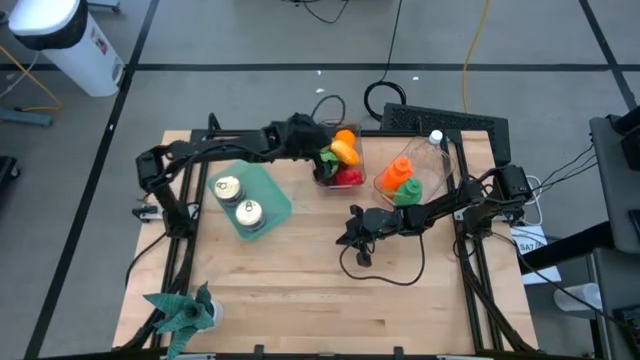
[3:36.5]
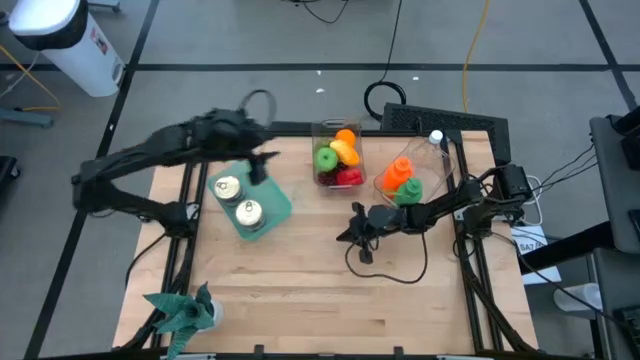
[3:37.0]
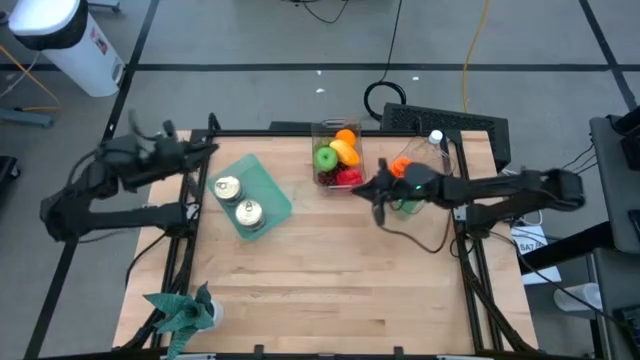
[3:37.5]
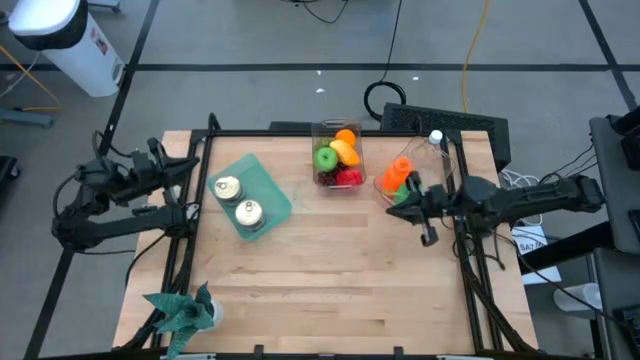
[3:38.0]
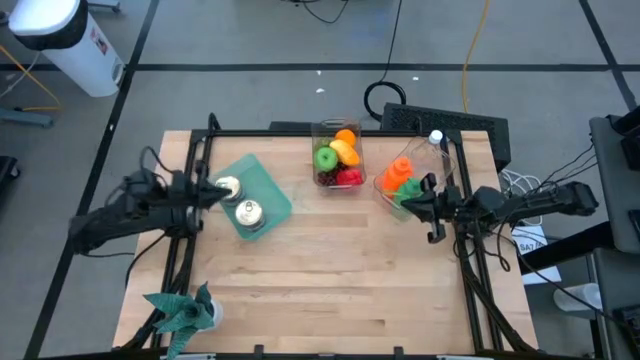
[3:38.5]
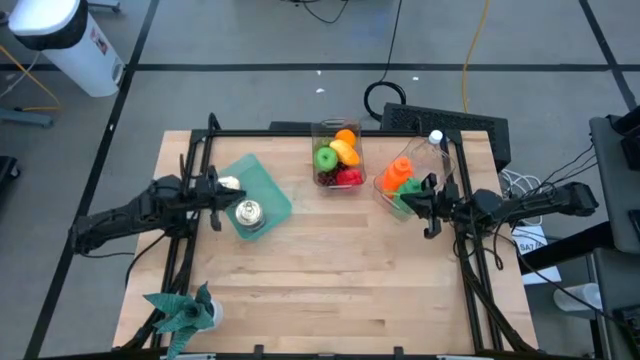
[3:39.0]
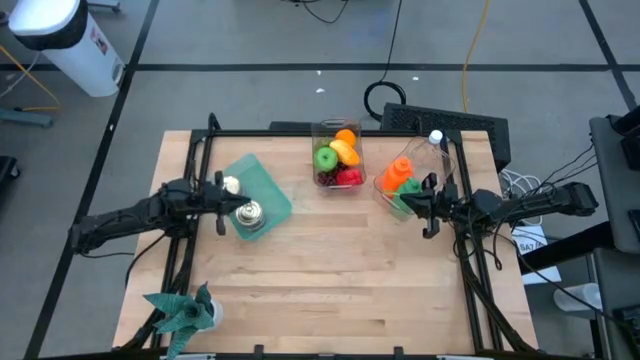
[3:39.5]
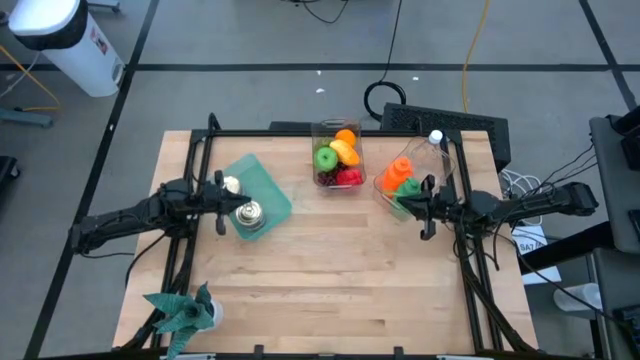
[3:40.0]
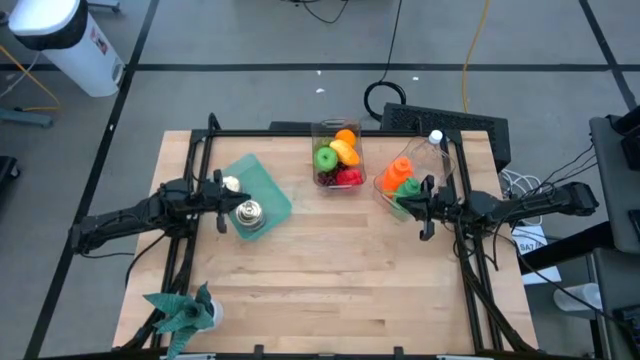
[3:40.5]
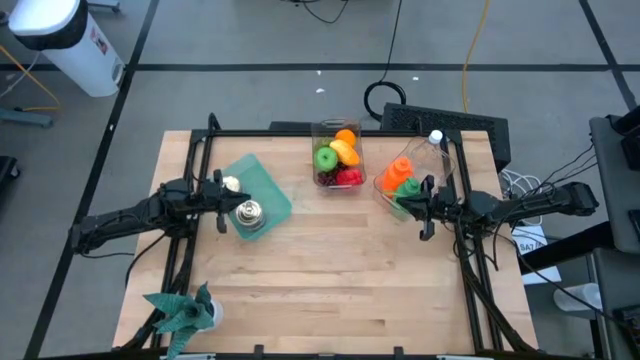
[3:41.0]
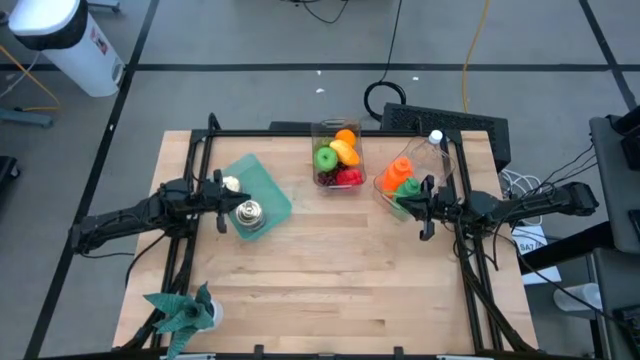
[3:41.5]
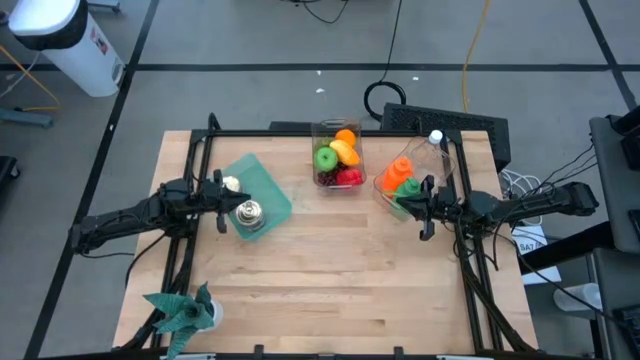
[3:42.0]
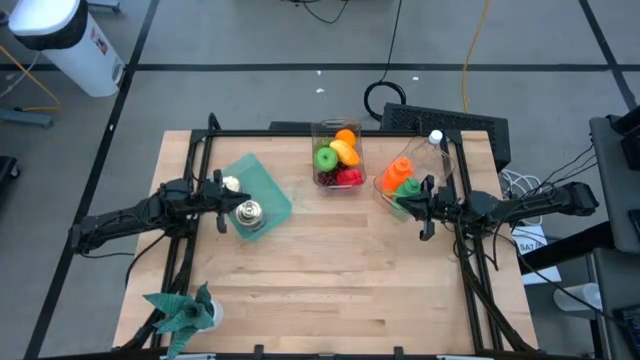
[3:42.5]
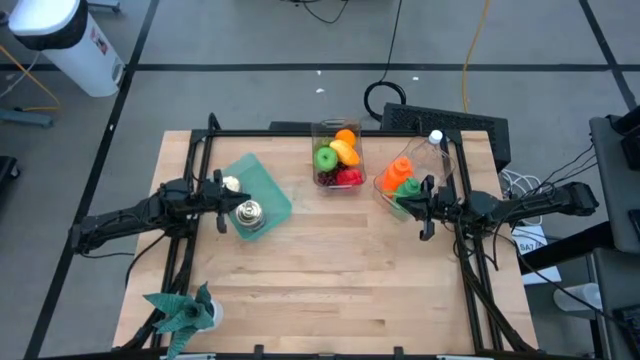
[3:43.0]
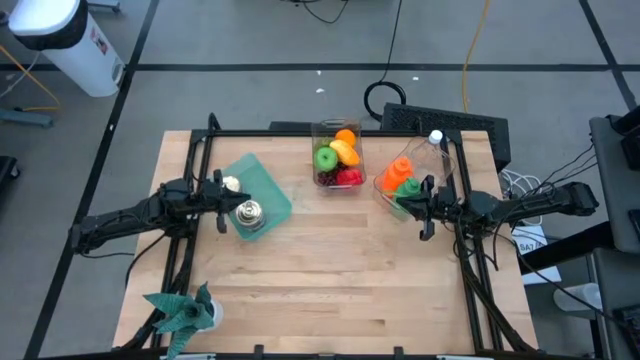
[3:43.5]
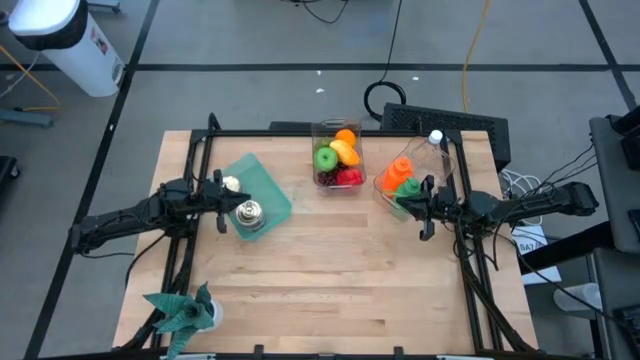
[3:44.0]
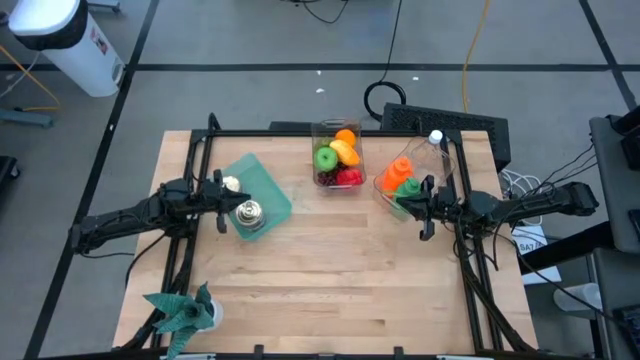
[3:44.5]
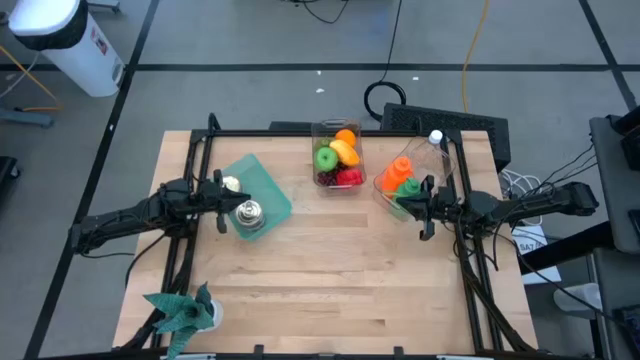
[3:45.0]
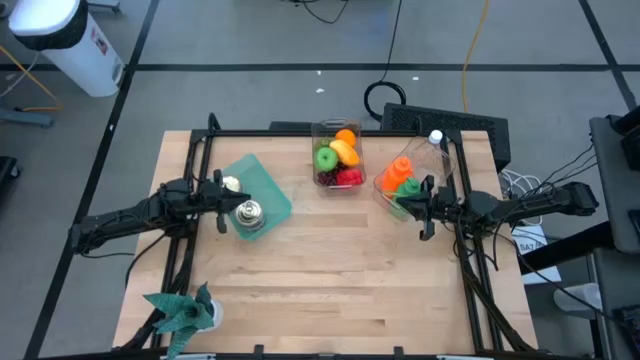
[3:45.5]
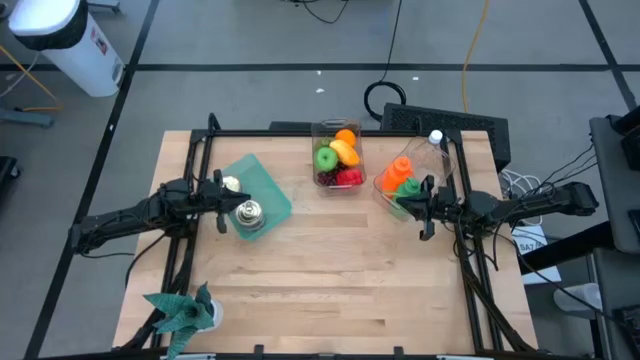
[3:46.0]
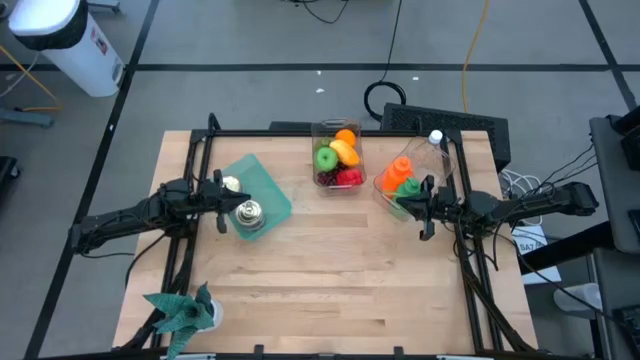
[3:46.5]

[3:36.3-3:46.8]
Task: Pick & Place Food Item
Return to Home Position
